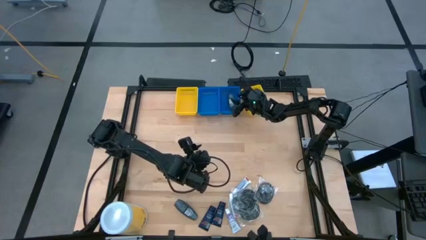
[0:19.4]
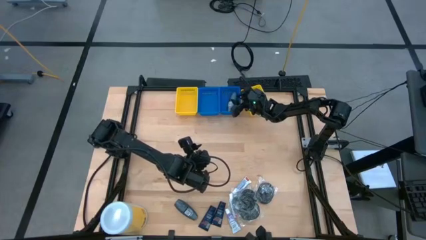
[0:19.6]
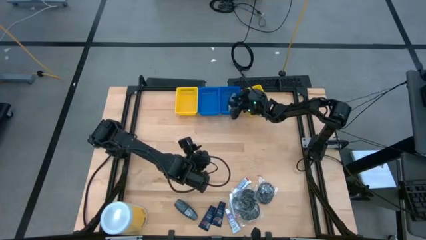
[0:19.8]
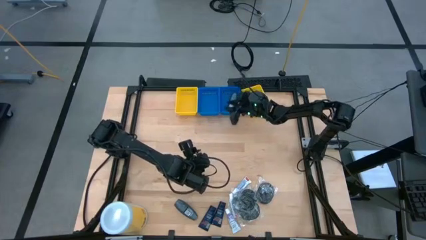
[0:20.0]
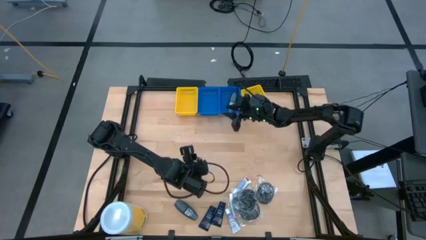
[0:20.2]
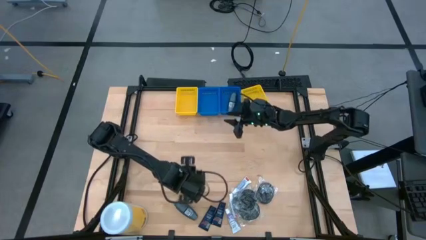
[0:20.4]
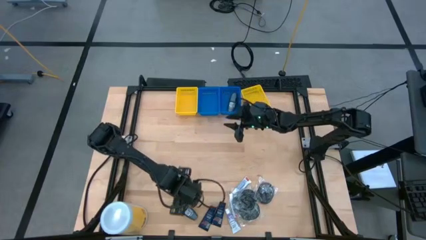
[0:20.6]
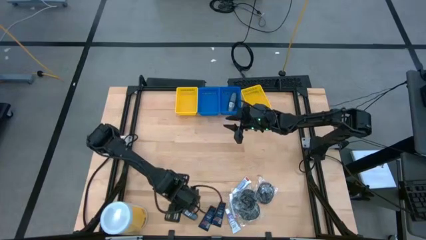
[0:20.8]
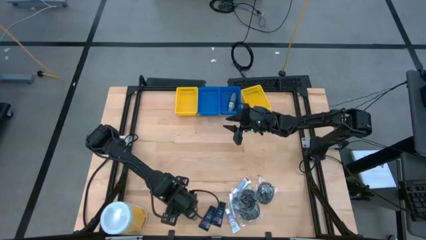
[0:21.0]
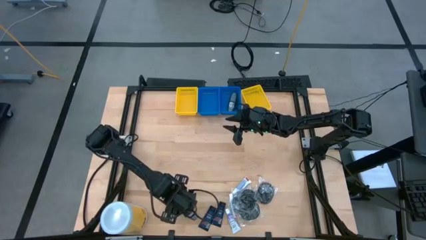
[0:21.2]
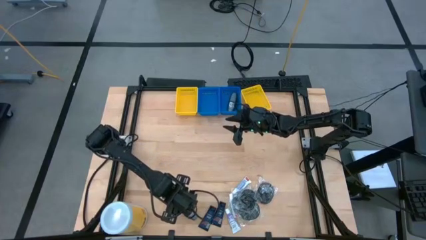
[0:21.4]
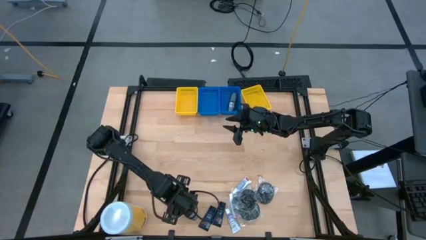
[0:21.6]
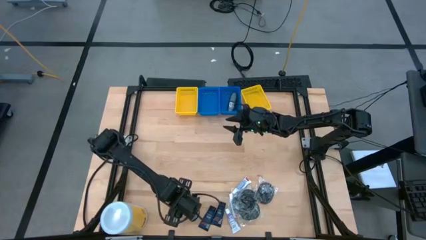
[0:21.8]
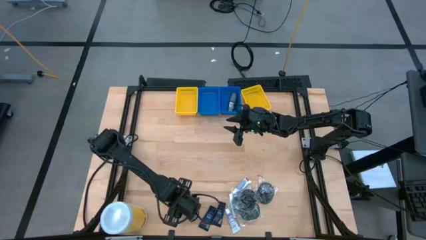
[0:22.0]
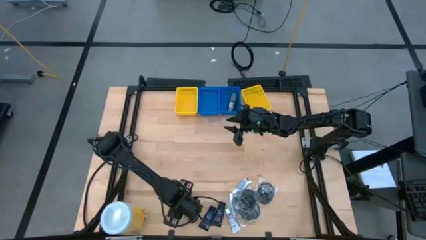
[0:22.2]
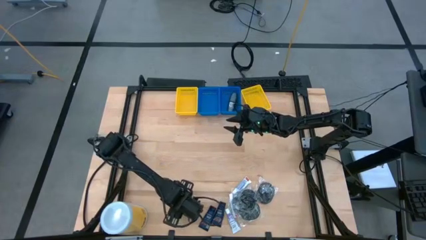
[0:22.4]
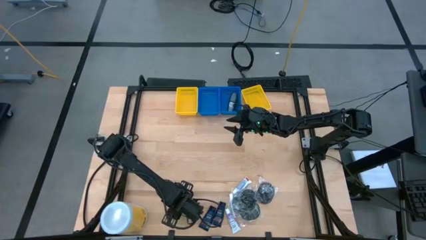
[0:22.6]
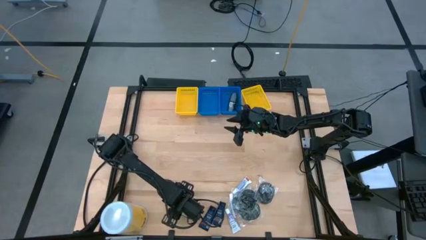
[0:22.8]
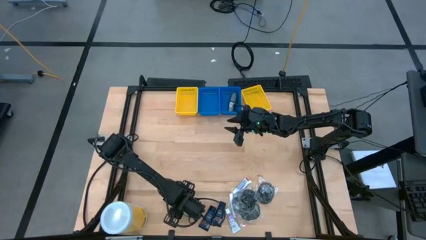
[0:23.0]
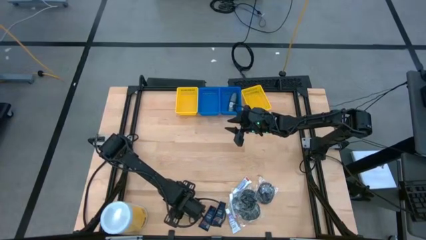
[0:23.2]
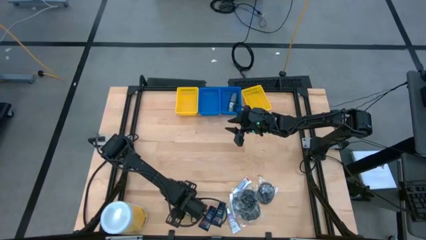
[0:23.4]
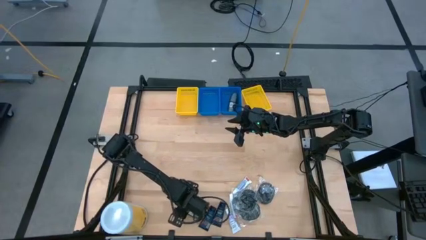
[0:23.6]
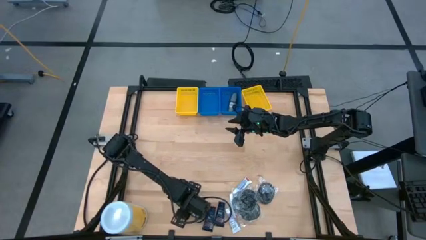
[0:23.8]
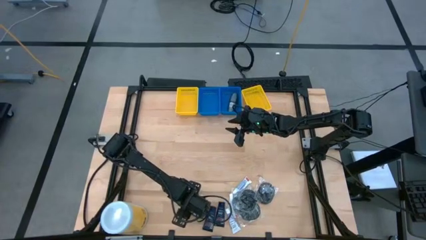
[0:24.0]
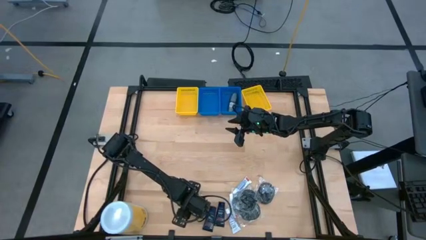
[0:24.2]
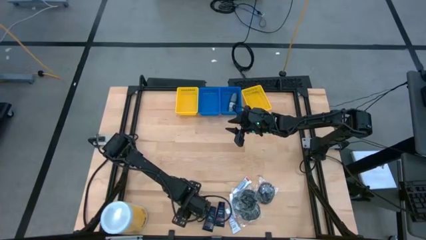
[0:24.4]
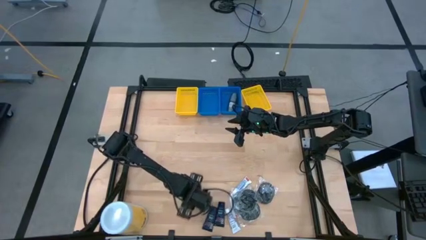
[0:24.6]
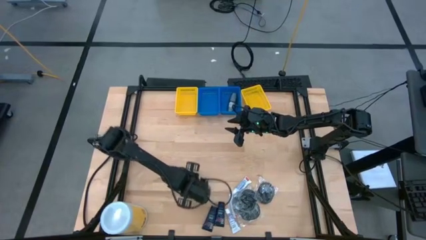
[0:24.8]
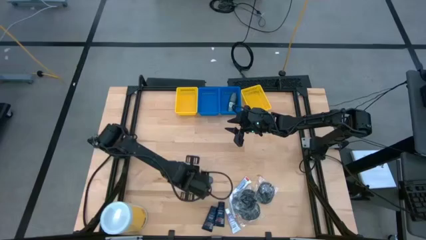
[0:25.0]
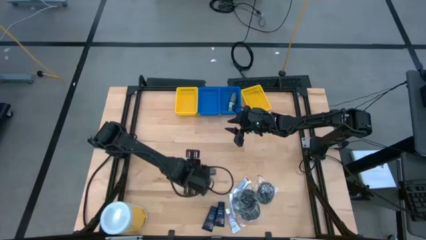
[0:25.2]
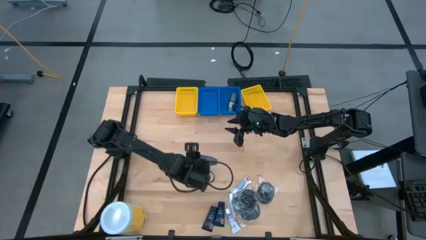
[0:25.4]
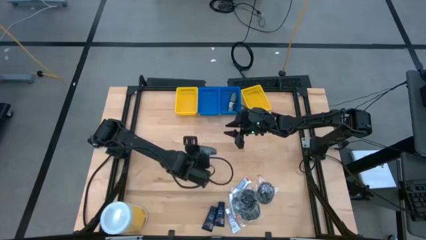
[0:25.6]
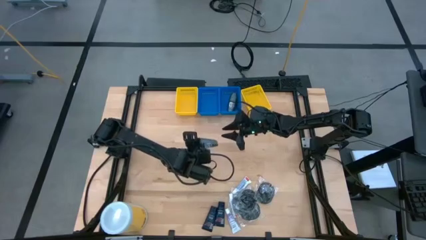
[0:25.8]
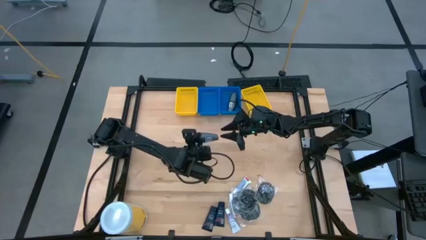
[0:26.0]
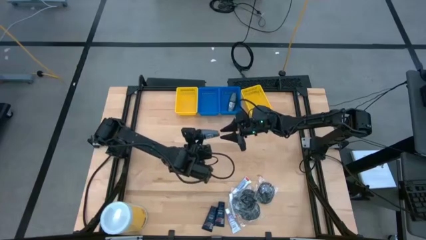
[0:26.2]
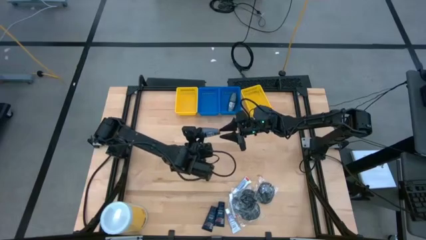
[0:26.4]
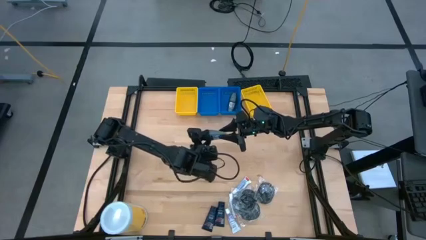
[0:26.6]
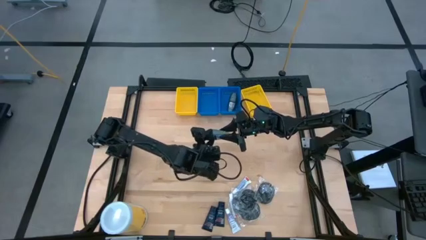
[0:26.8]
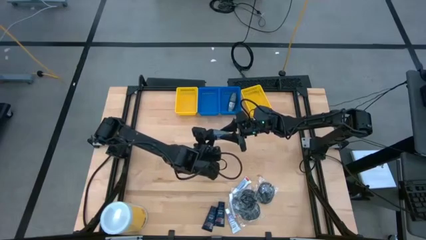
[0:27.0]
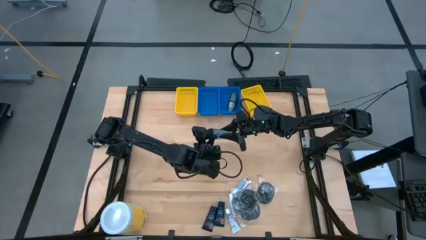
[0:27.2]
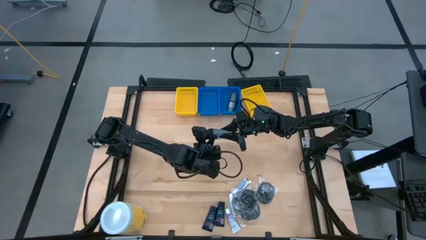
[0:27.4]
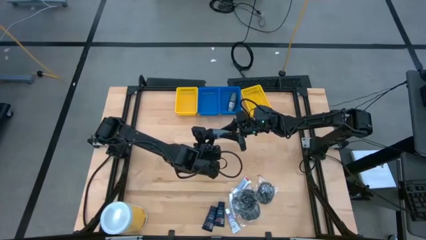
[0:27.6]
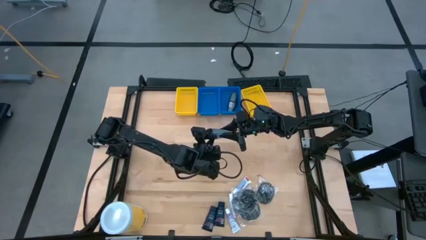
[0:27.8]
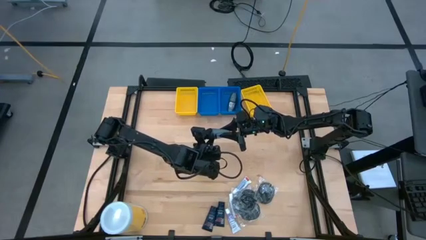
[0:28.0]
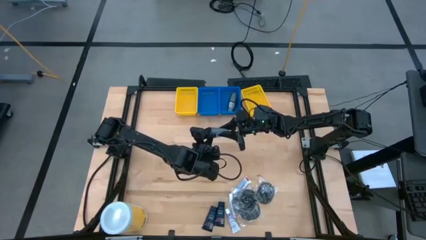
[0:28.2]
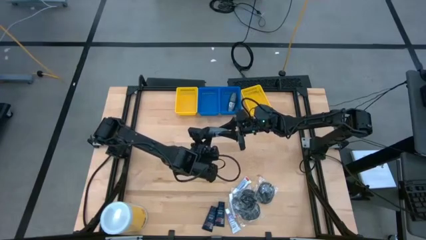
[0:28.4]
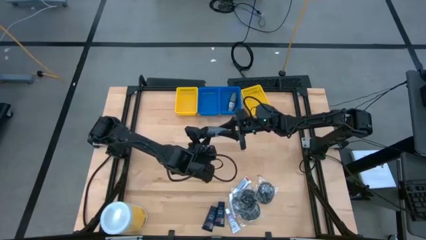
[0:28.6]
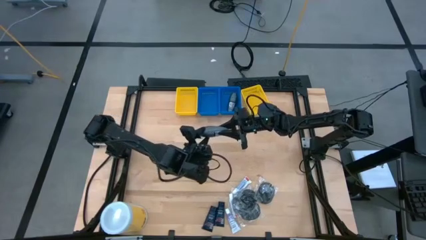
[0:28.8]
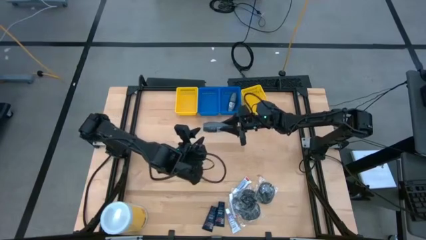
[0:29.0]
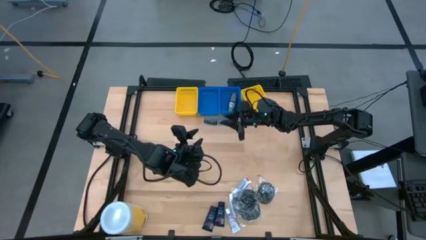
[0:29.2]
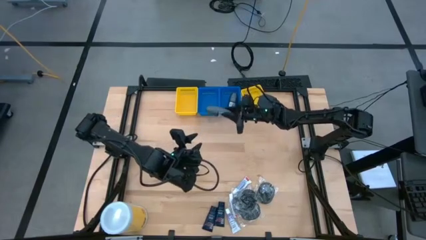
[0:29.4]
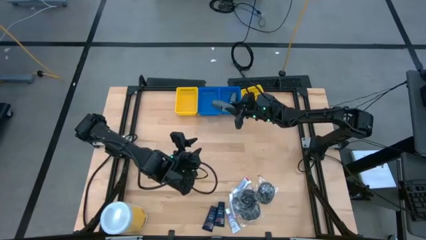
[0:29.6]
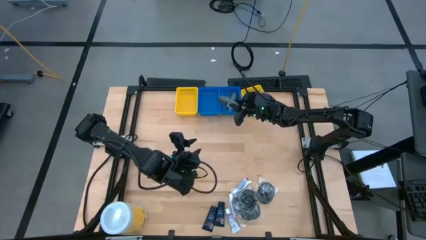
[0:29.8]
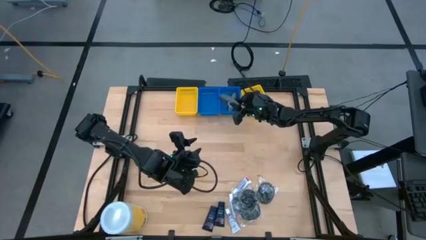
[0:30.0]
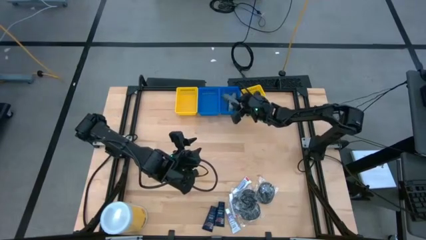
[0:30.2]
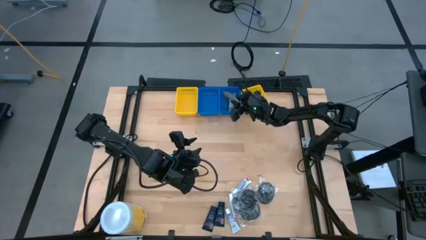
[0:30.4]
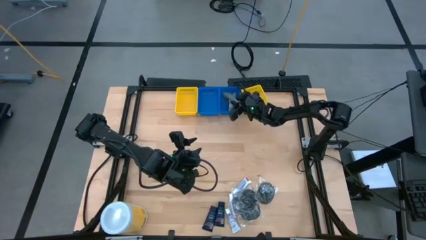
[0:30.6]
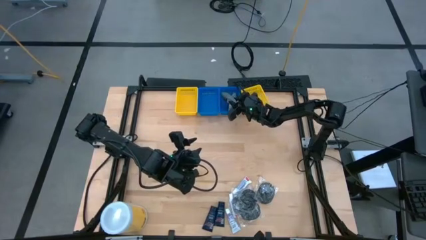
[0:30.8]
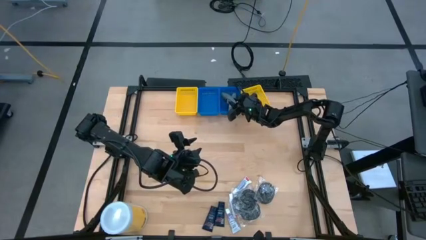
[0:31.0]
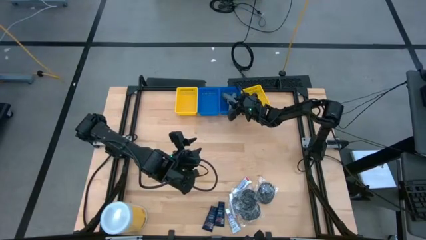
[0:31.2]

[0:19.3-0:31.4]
Task: Pick & Place Travel size toiletries
Put the deodorant cream into the right blue bin
